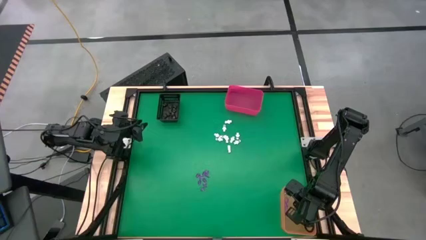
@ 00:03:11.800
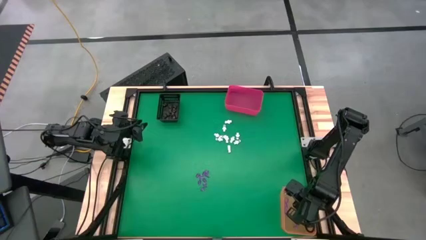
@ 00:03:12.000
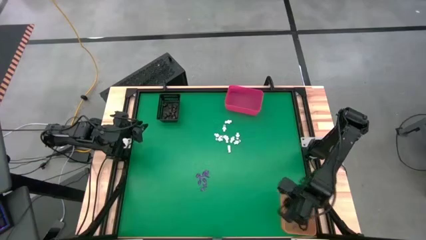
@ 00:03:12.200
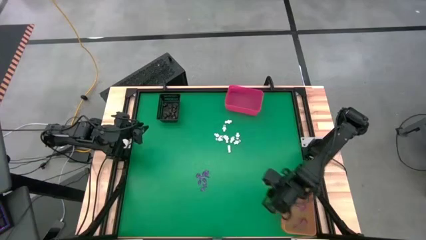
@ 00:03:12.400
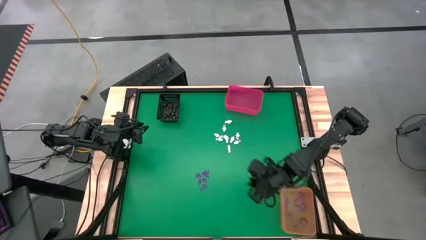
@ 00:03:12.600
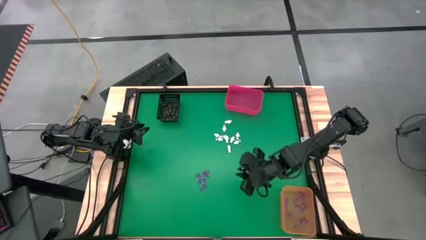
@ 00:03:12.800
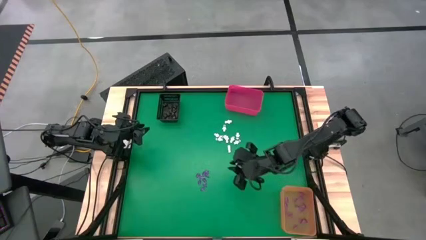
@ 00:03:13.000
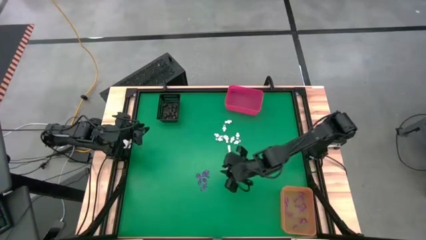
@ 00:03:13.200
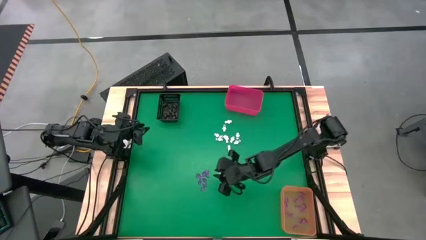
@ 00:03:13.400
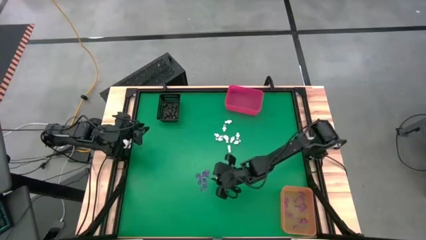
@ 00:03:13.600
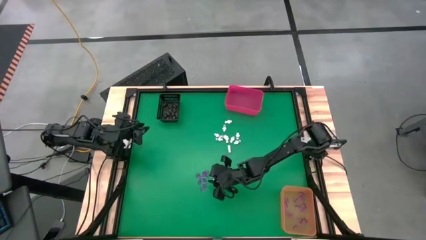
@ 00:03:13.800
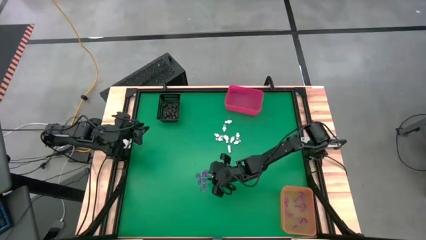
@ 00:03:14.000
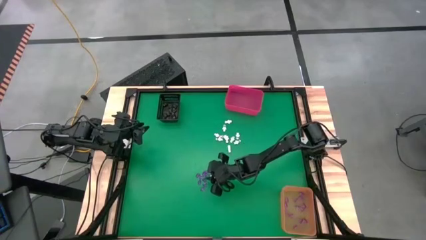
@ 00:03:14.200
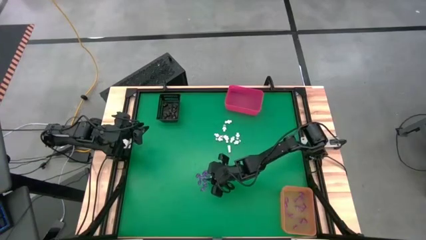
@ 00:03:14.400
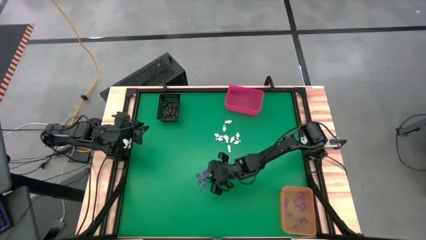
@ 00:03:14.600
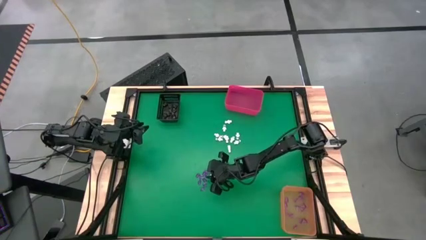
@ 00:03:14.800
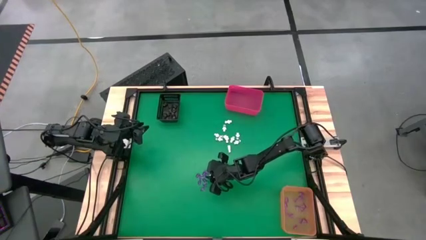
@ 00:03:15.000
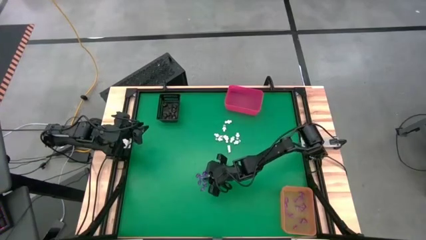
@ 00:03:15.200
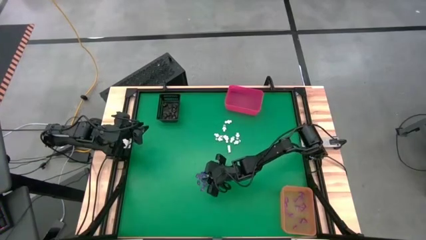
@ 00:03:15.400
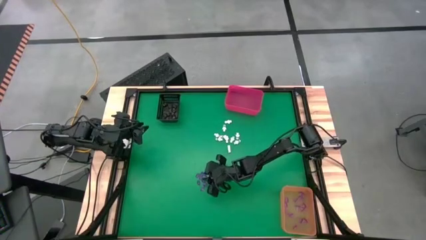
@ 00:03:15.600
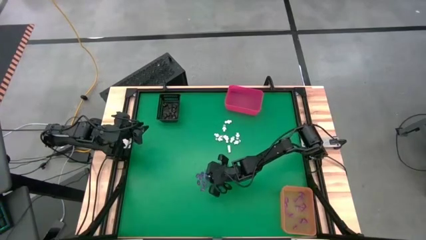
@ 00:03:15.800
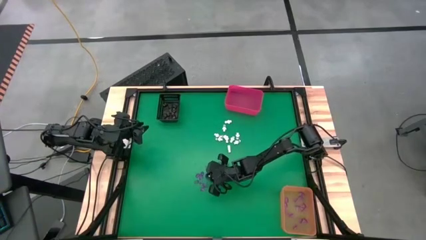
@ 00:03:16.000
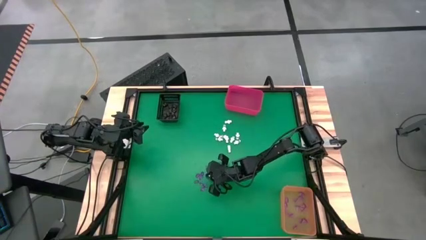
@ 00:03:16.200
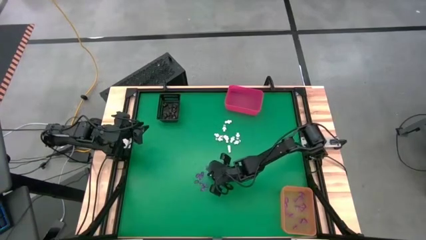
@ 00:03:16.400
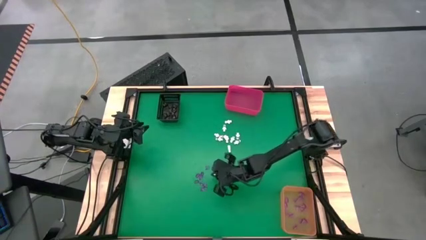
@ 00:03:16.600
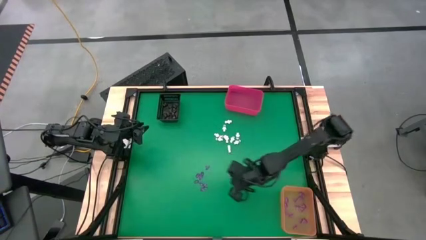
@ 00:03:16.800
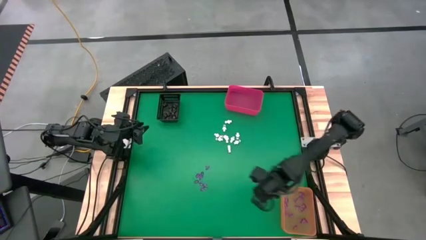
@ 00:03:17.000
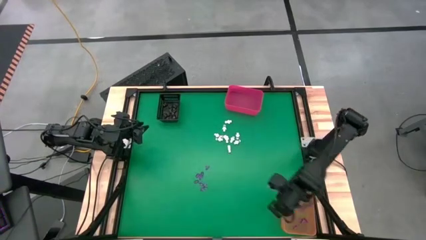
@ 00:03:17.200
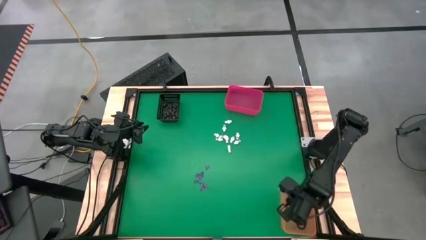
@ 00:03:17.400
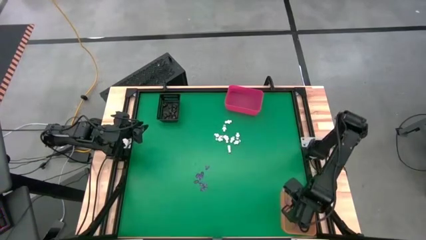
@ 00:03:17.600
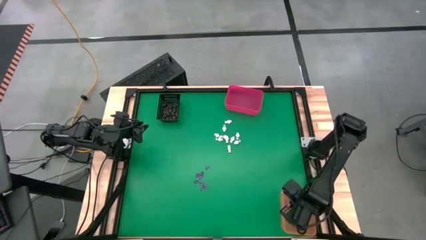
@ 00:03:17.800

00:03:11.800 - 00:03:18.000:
Task: Sort Halloween decoration
Put the pink witch hat toy into the orange bin

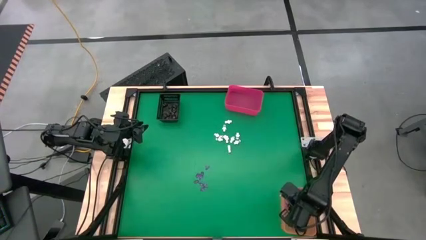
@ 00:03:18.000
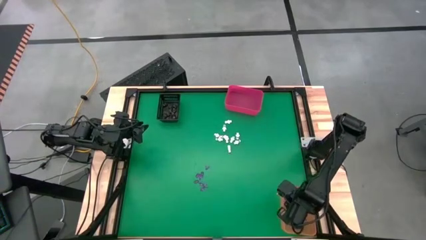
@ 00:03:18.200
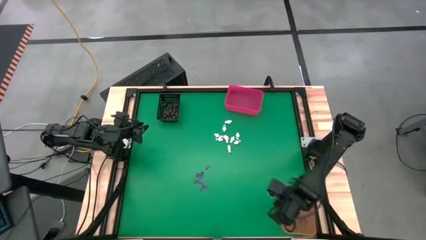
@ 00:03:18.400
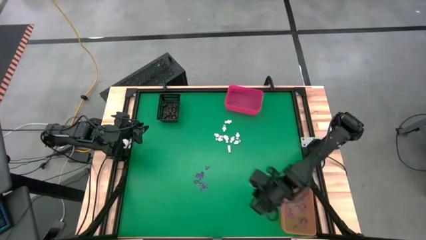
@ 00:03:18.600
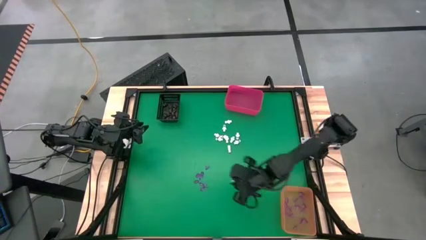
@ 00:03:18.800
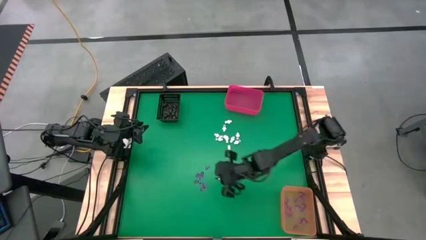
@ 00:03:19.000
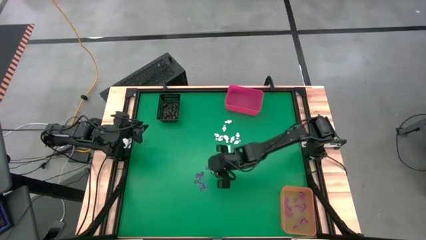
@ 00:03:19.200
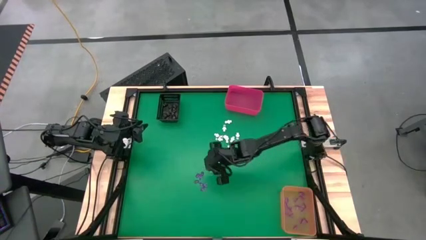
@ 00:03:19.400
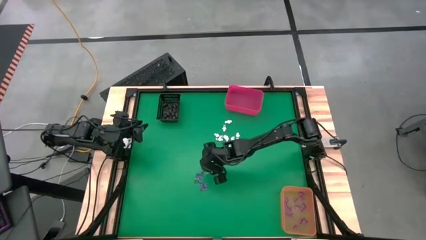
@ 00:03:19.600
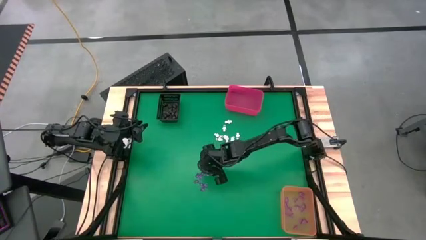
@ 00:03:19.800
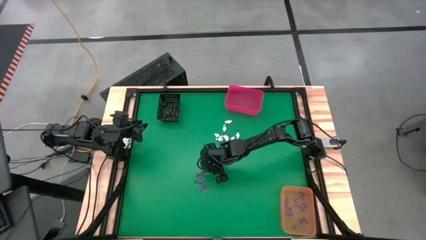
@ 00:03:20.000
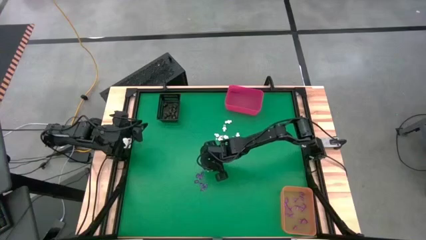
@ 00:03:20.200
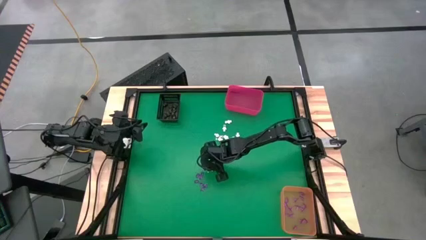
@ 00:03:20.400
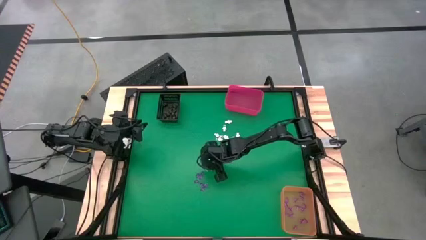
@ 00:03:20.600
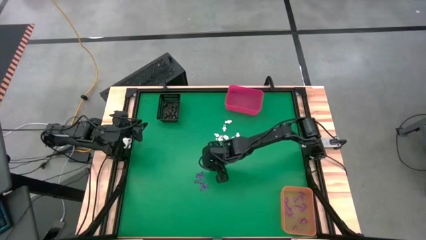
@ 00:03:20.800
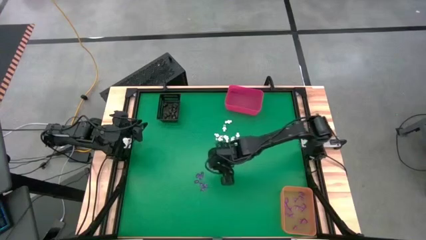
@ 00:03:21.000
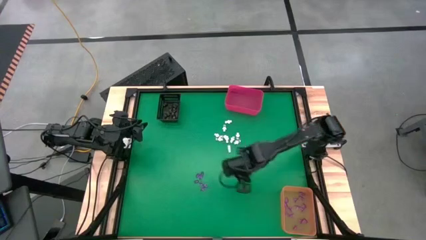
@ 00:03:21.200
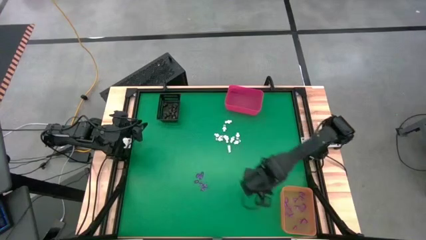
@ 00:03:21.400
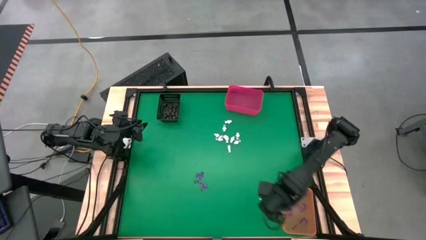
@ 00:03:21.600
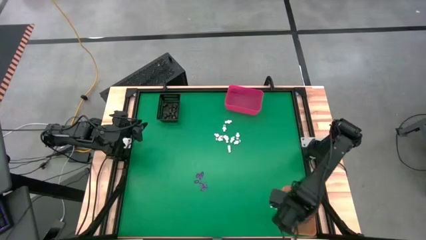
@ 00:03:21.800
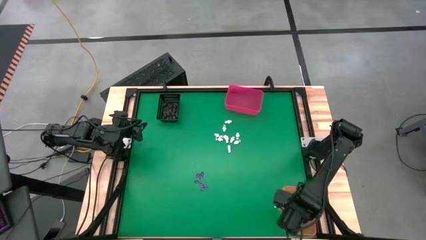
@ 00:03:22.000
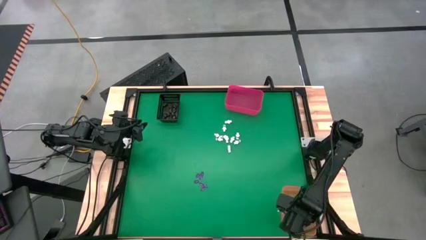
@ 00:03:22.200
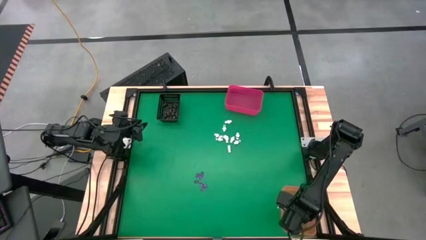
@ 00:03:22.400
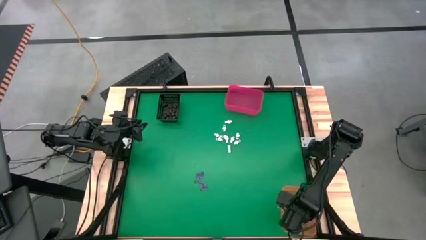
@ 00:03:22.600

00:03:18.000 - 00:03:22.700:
Put the pink witch hat toy into the orange bin

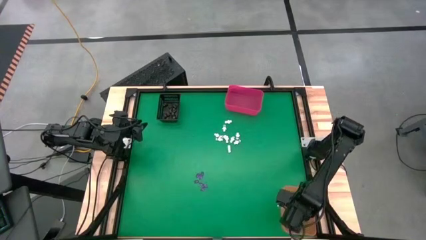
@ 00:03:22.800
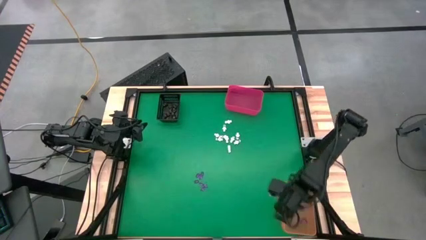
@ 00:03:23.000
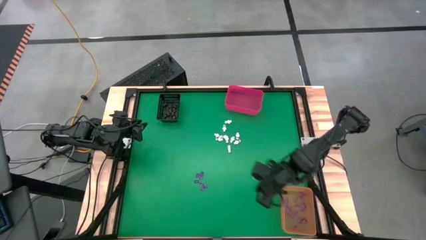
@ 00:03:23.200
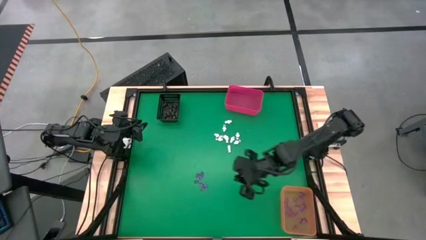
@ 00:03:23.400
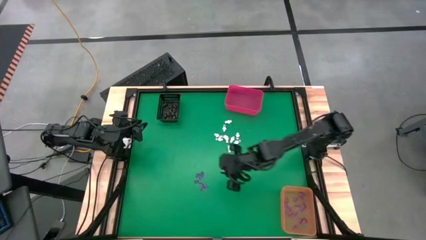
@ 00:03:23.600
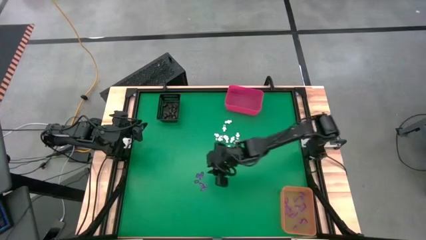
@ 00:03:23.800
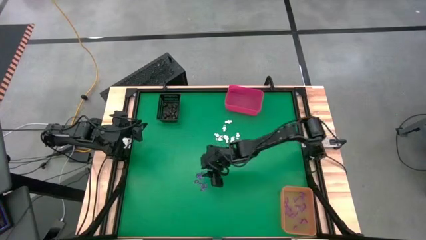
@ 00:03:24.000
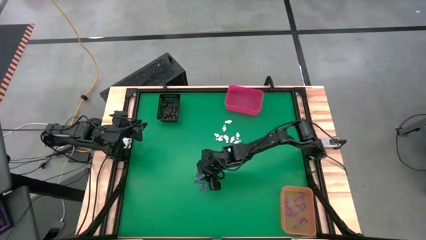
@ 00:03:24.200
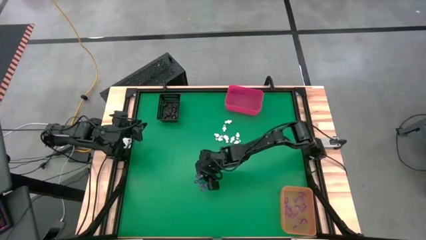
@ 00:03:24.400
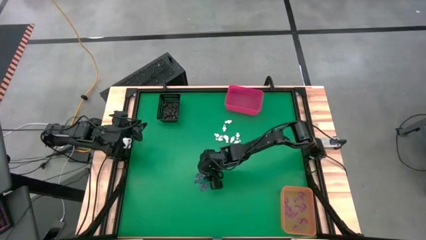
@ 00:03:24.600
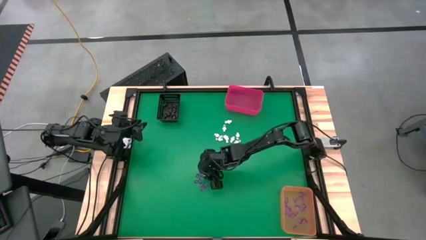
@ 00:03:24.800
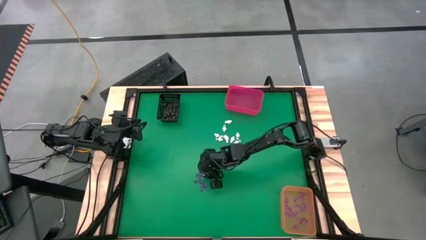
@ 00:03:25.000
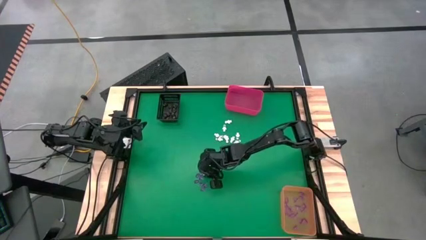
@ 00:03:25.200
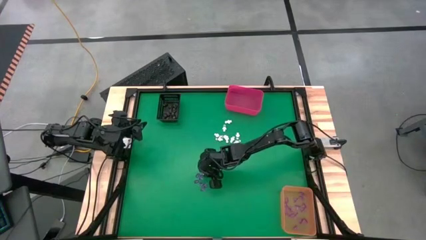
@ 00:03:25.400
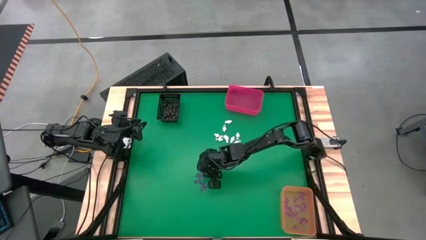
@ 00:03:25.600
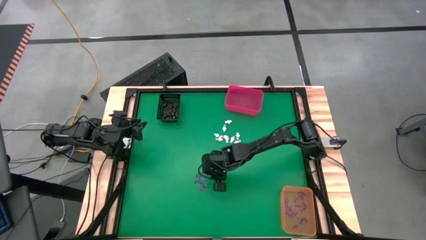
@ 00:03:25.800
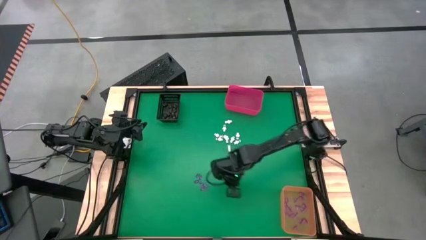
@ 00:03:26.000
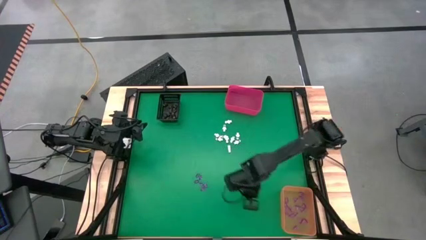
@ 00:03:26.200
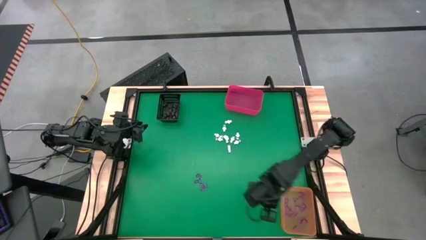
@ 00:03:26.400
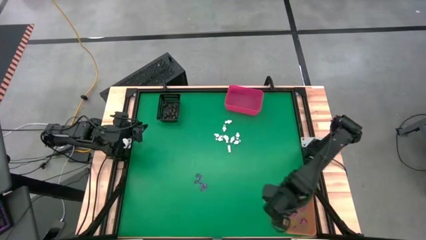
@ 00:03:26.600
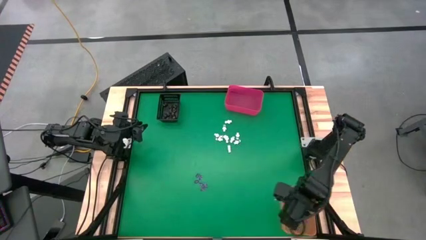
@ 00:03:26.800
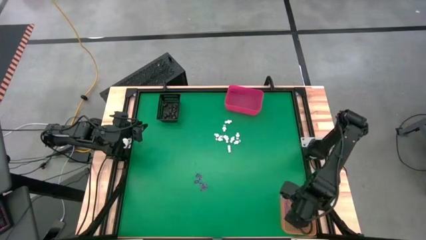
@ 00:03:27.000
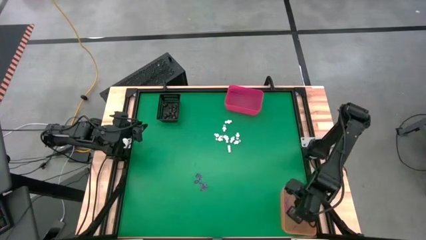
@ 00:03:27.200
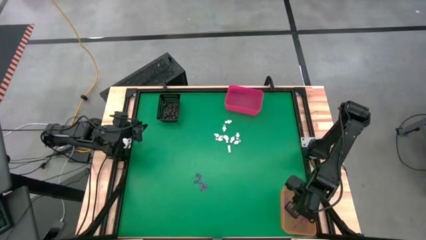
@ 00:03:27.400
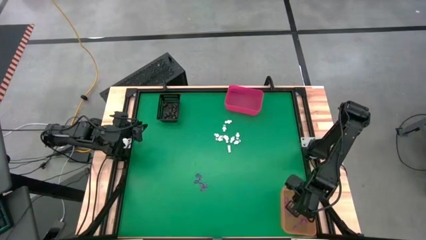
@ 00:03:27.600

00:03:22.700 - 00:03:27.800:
Put the pink witch hat toy into the orange bin

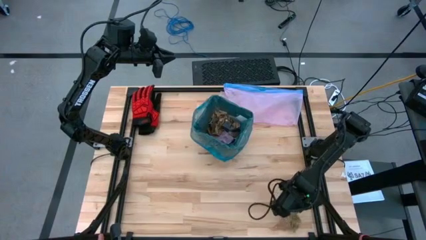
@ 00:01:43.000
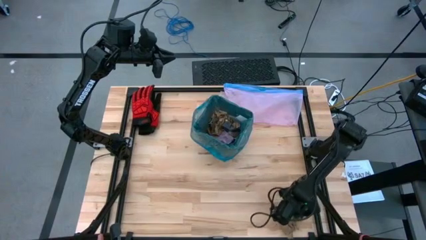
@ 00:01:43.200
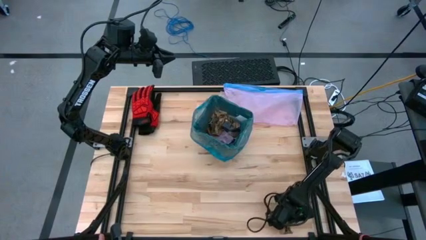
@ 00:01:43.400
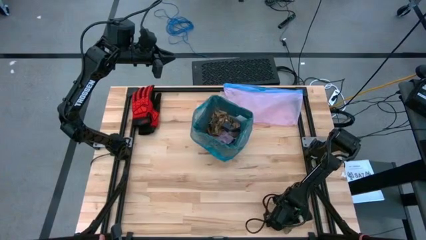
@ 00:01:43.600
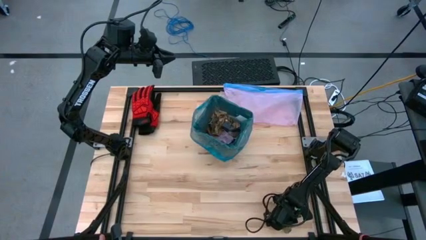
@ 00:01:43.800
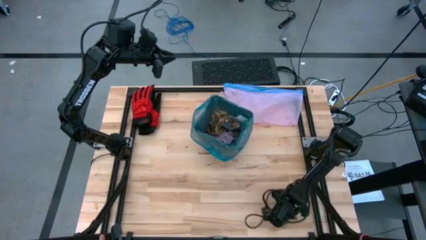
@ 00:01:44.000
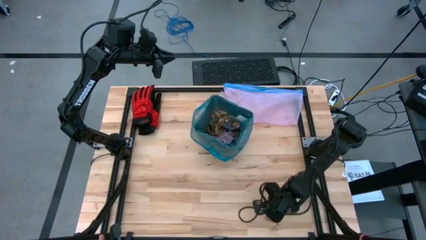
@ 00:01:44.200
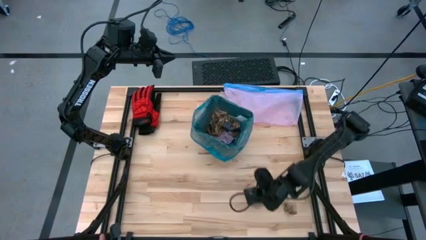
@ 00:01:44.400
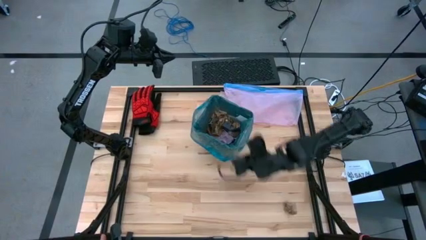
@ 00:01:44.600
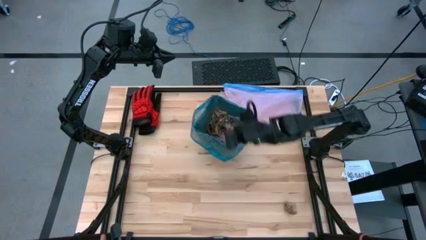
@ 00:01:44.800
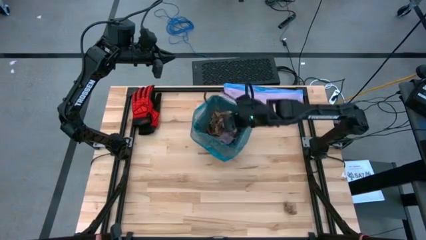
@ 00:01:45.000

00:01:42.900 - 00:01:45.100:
Task: place trash/remove bag and relplace
Put the brown napkin into the black trash bin
